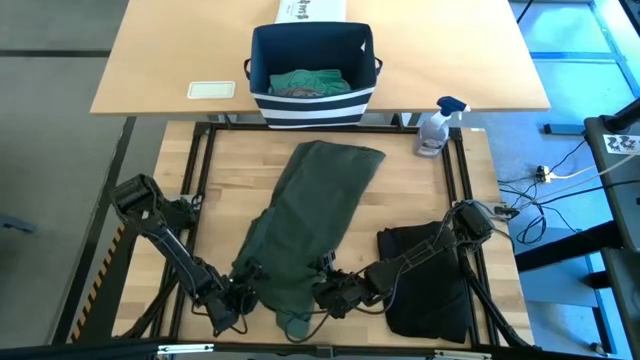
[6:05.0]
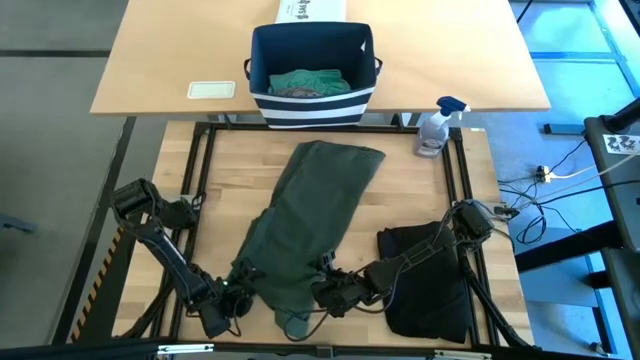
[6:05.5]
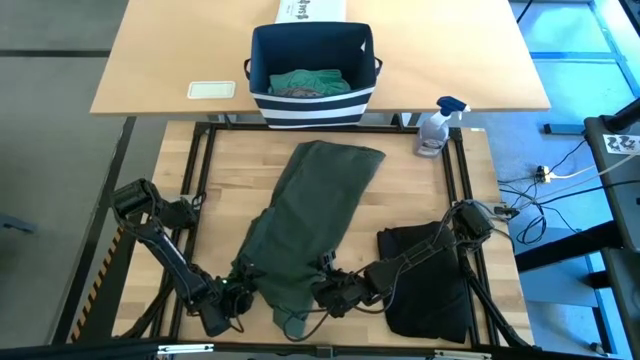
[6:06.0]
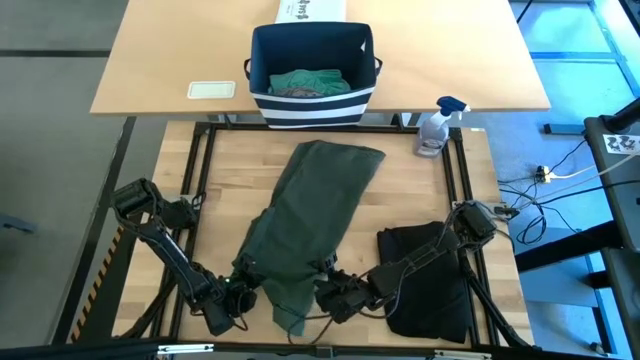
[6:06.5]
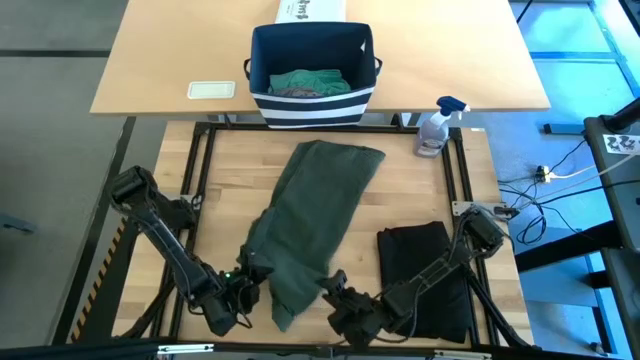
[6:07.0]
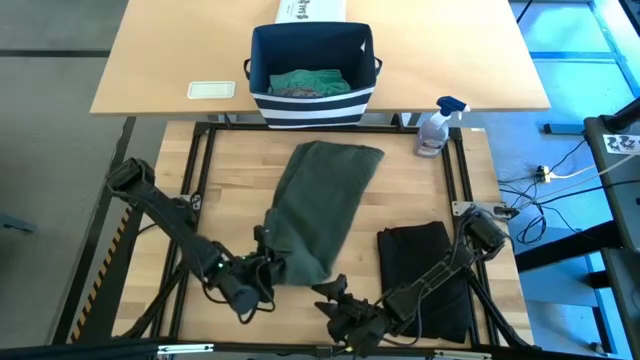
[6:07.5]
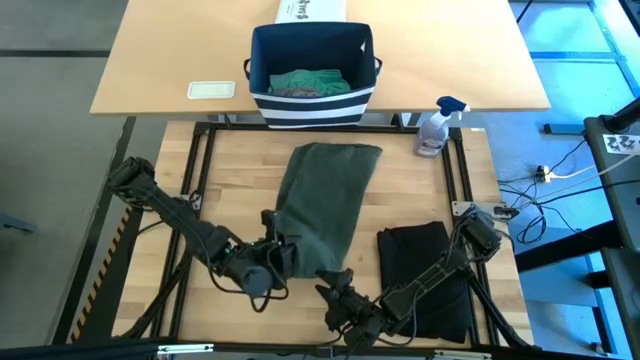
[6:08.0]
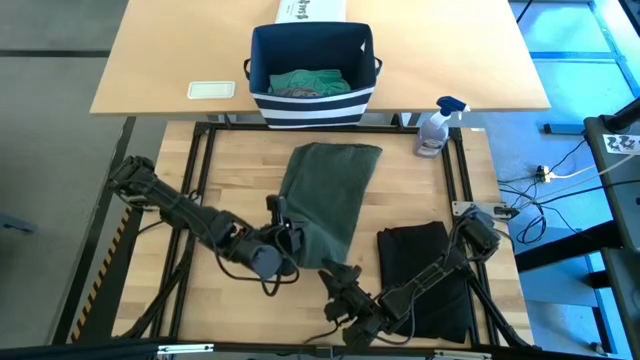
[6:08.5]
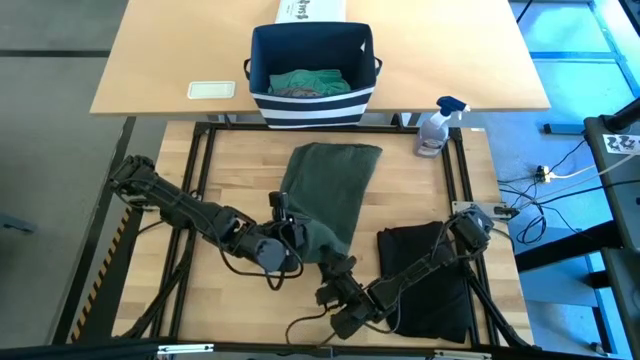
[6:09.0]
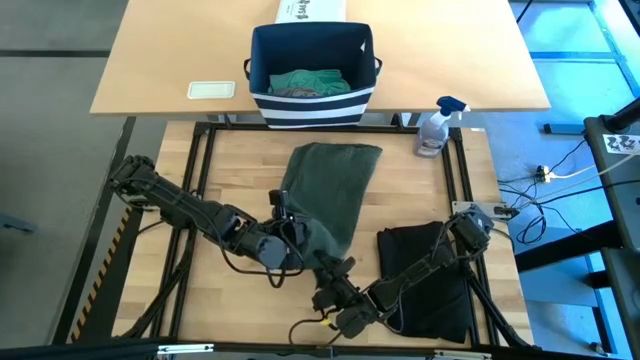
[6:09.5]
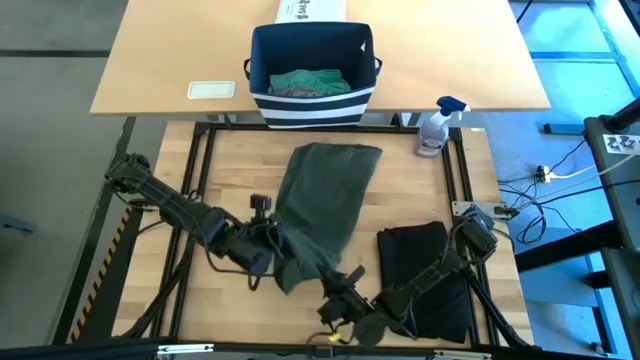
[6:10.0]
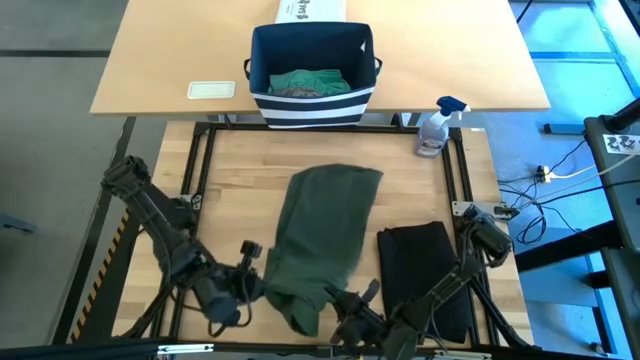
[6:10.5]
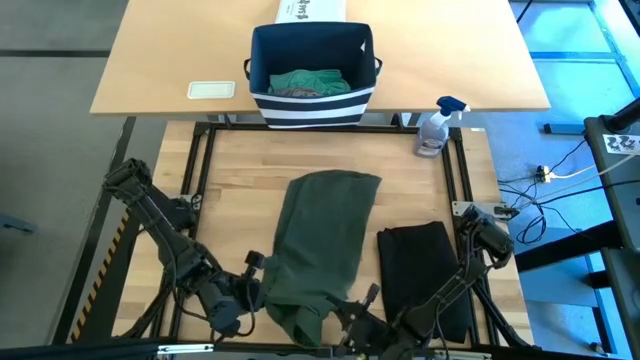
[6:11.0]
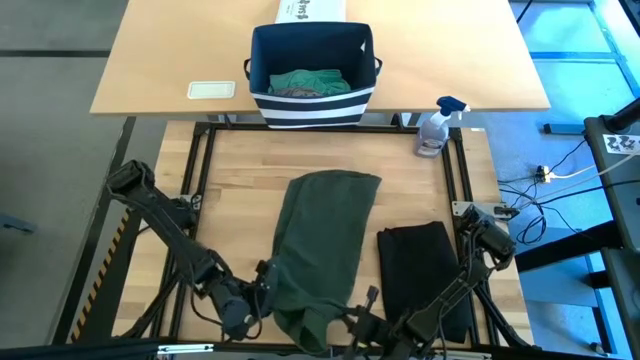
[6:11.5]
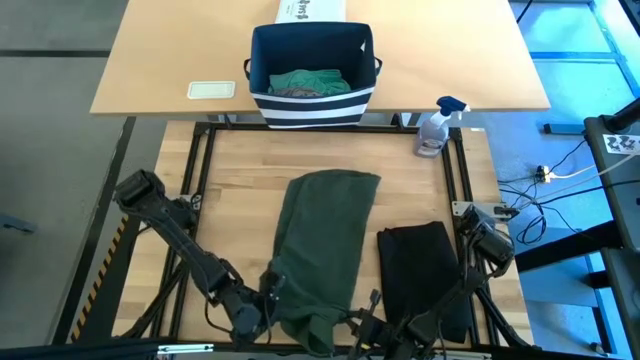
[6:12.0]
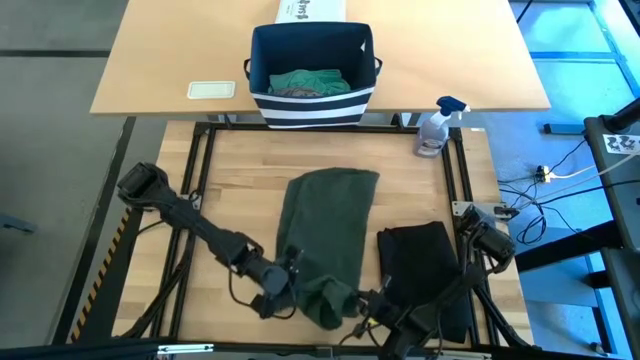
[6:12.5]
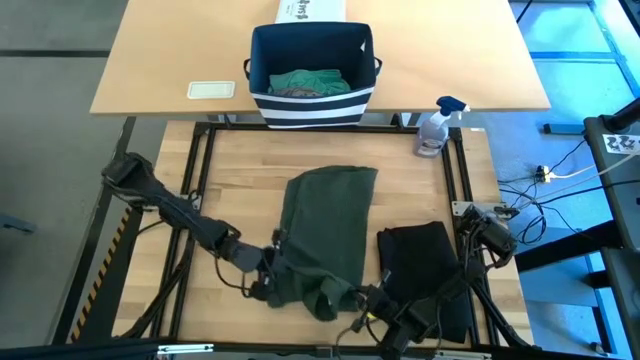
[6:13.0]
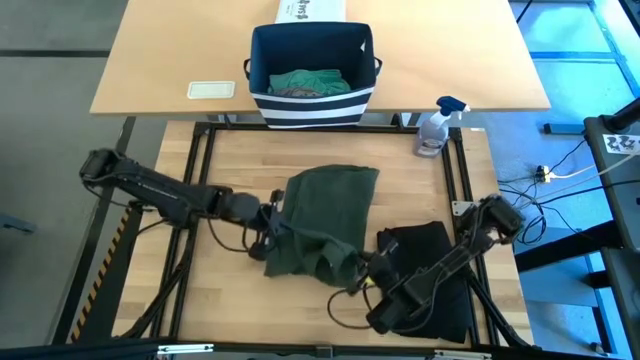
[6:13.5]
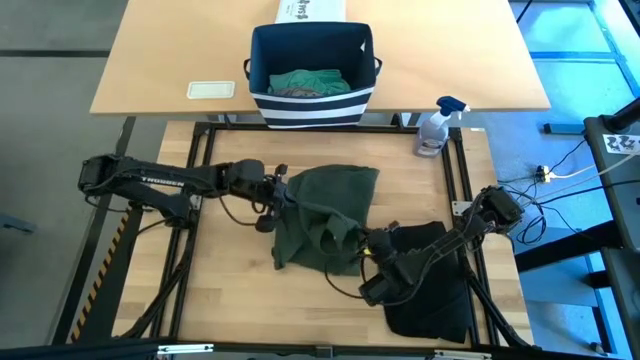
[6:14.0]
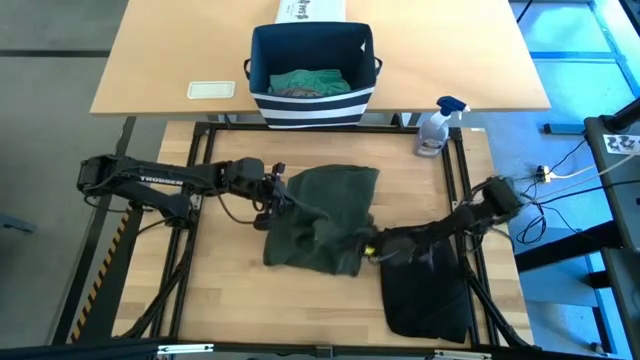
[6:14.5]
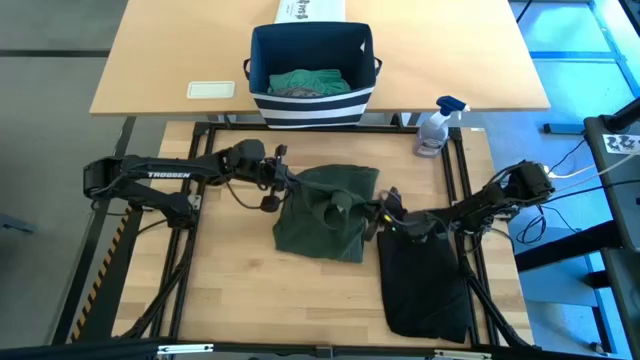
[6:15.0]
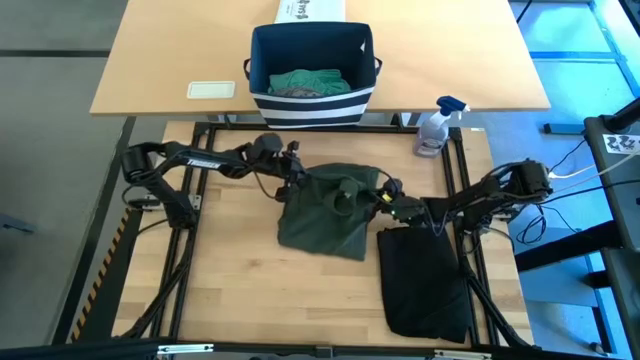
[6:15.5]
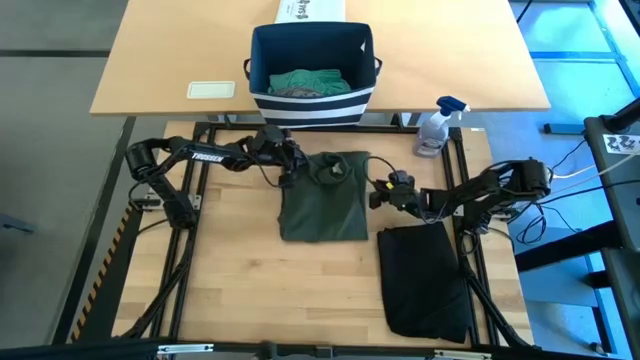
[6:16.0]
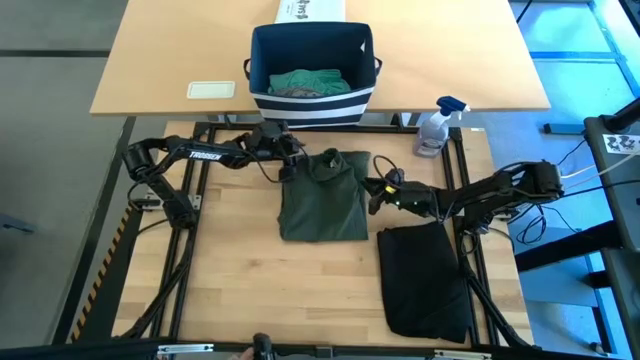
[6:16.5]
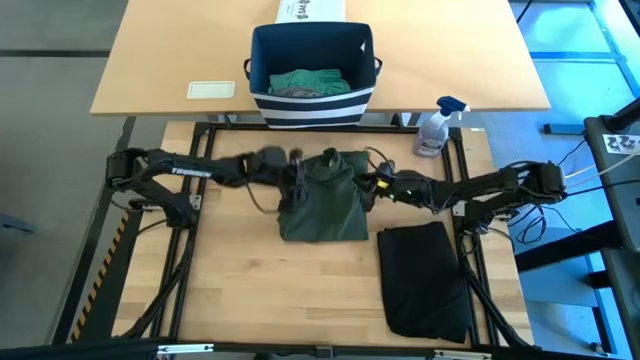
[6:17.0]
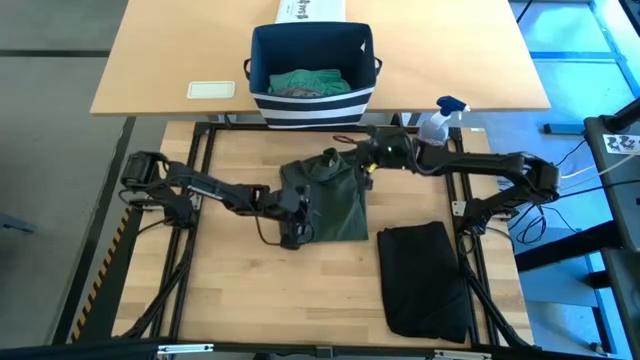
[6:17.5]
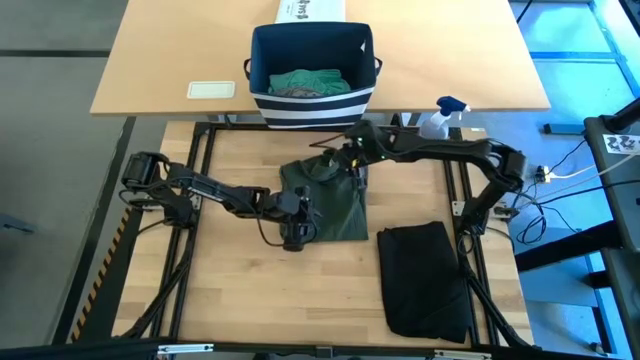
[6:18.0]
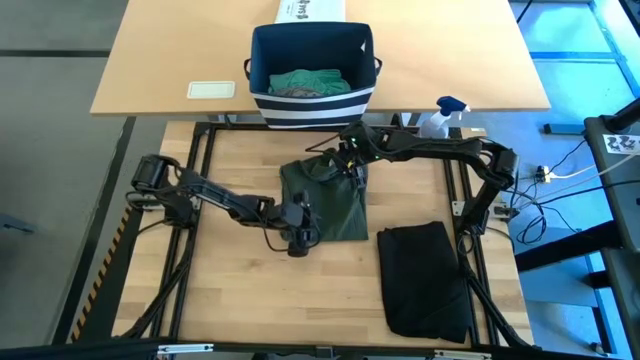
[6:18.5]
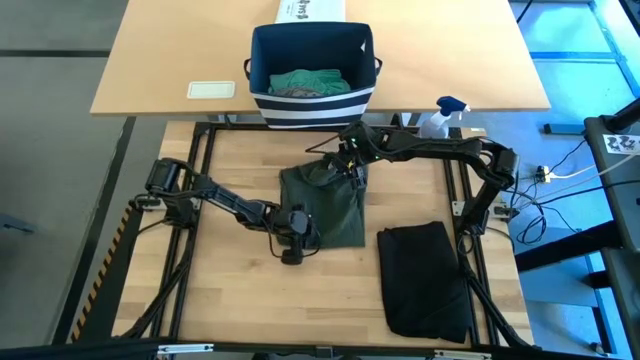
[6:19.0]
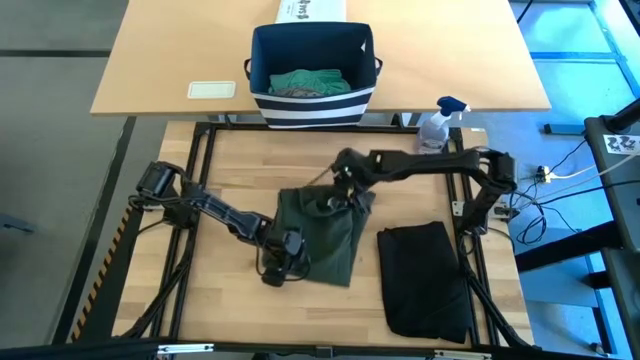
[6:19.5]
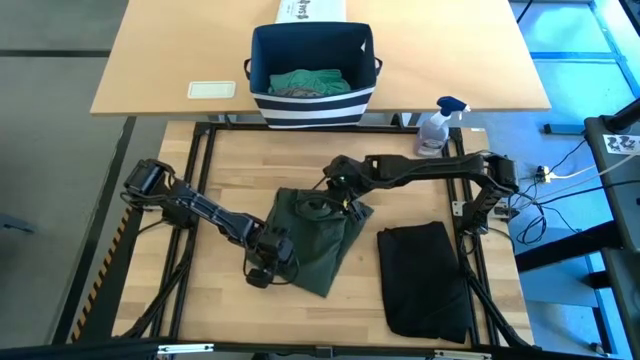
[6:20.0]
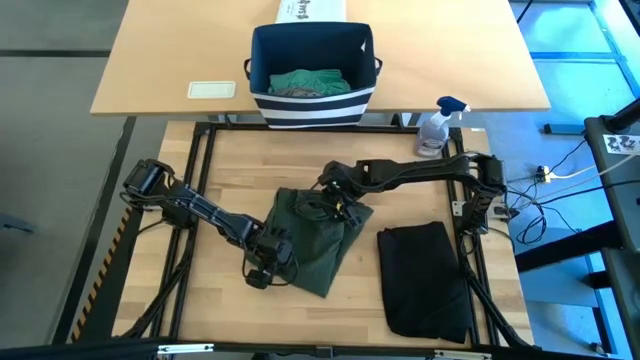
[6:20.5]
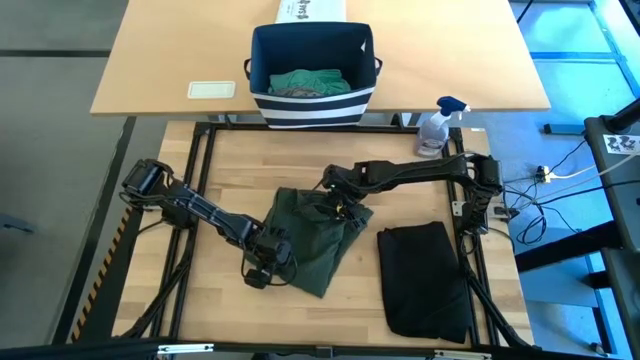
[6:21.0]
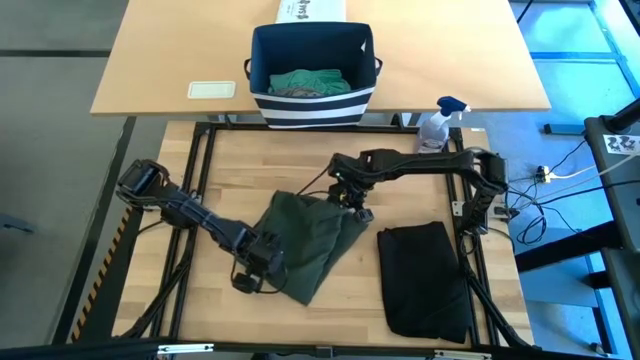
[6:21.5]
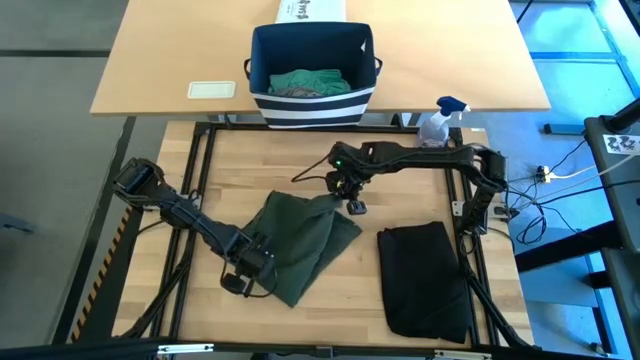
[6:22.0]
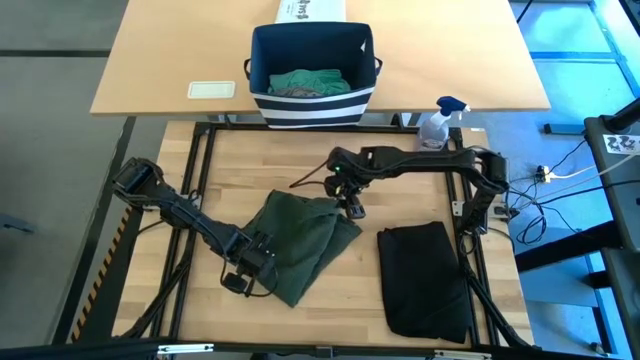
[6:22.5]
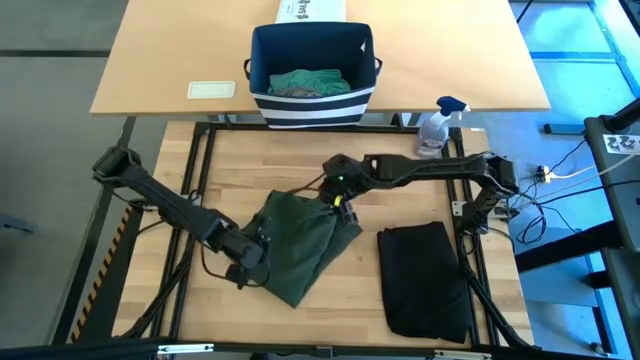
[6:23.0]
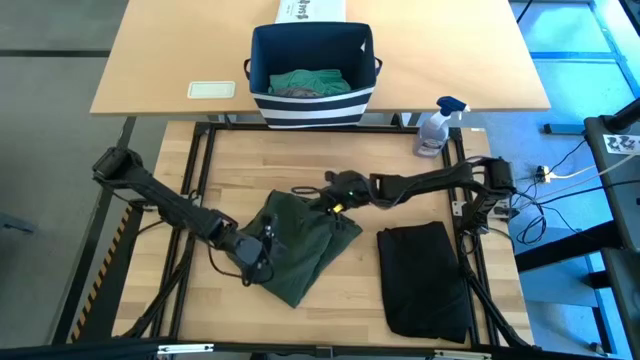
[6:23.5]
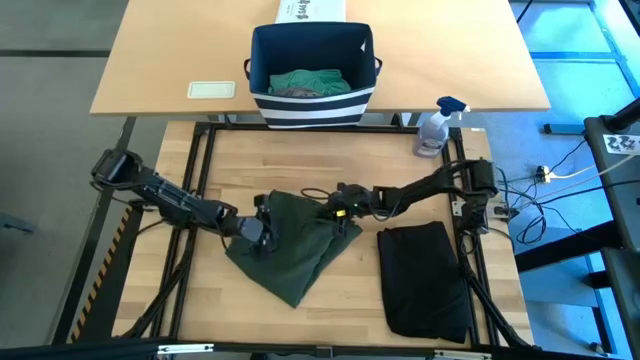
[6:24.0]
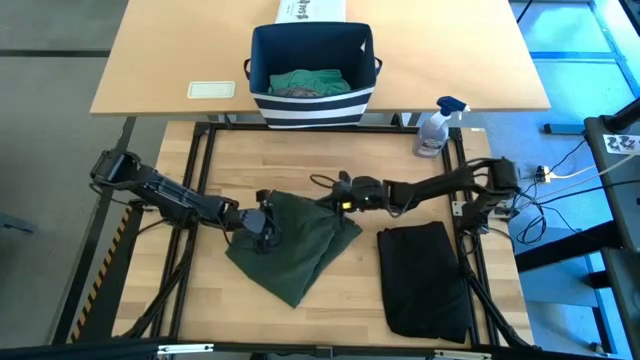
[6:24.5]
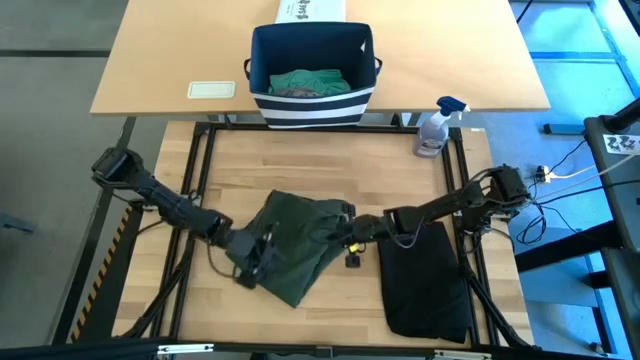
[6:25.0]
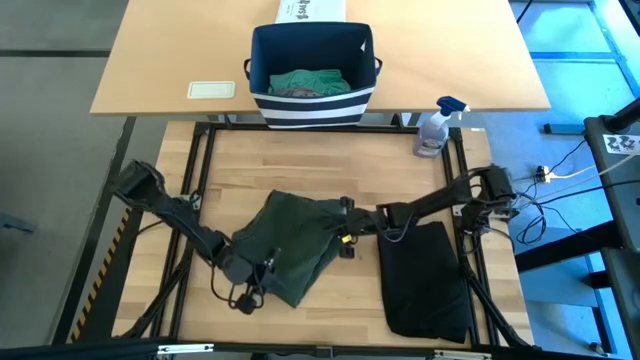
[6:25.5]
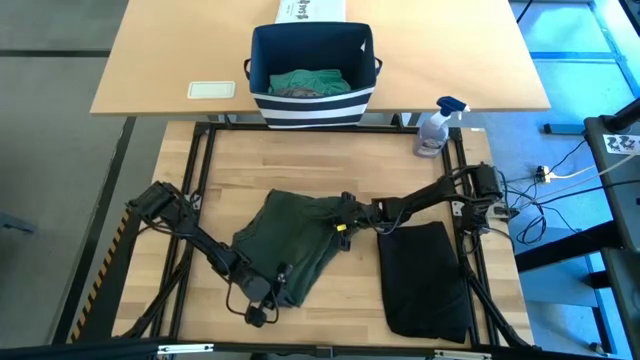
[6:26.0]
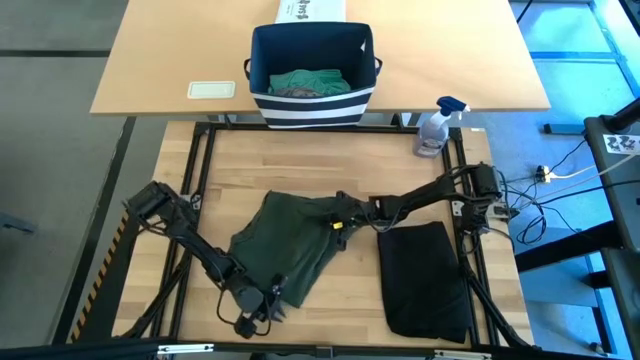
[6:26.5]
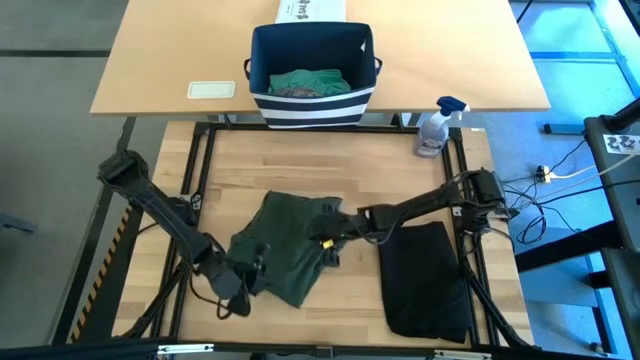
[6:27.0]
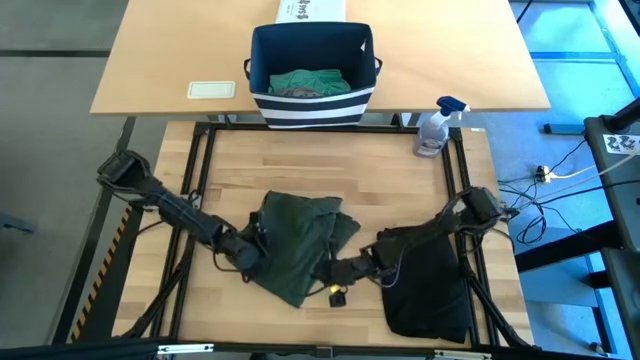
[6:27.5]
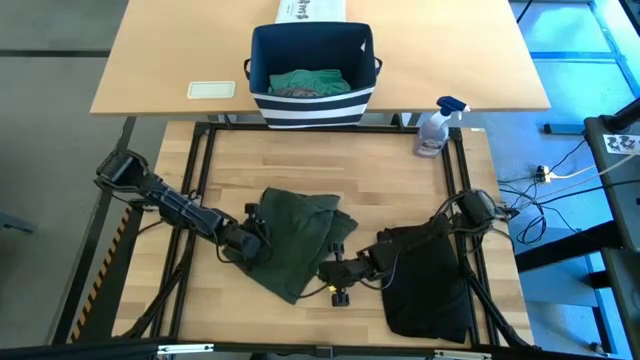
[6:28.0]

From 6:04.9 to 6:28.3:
Task: Fold Laundry from Bin
Fold the green polo shirt
